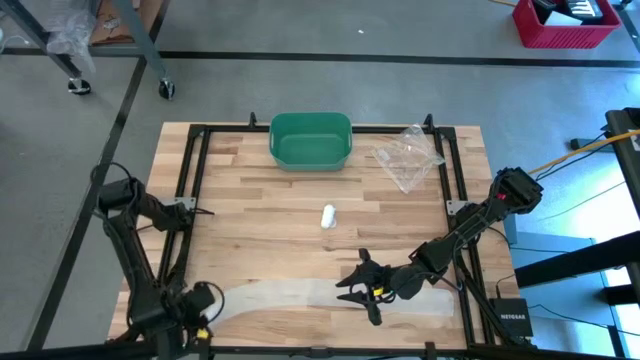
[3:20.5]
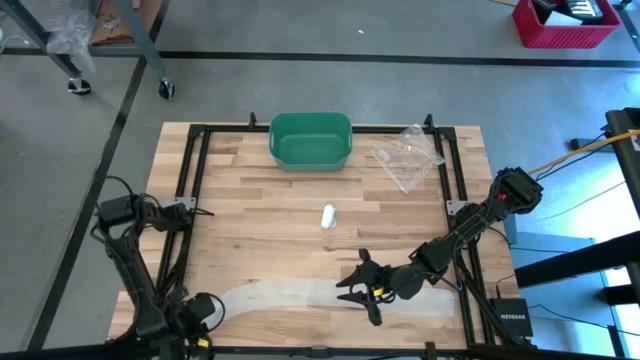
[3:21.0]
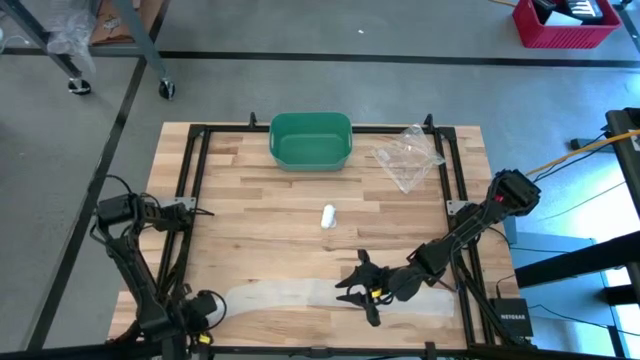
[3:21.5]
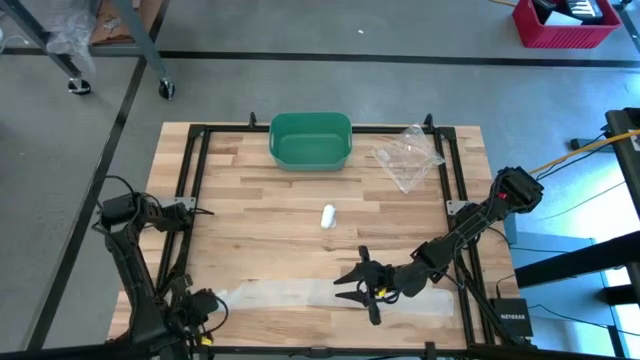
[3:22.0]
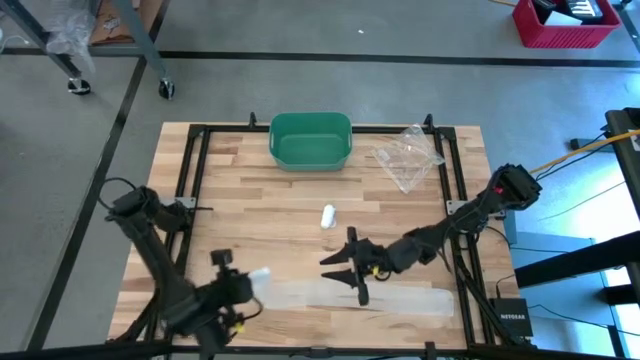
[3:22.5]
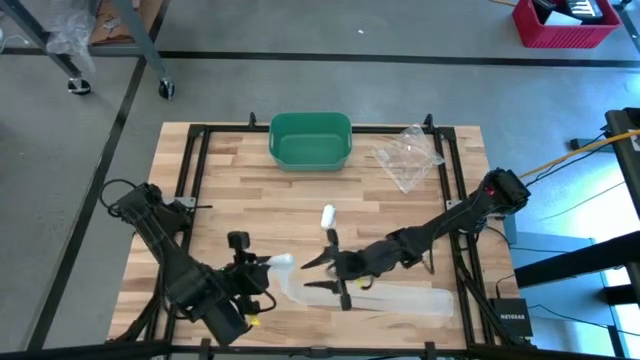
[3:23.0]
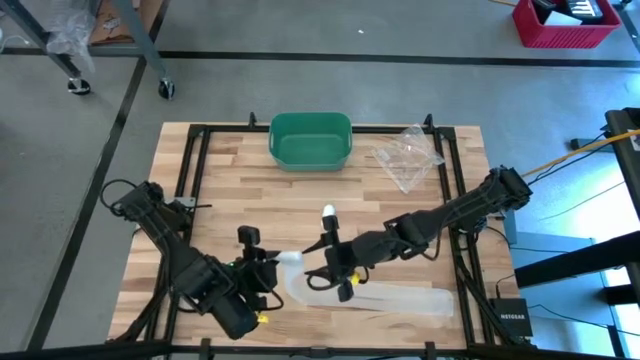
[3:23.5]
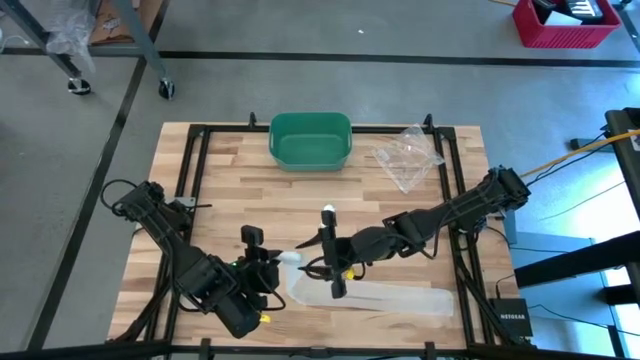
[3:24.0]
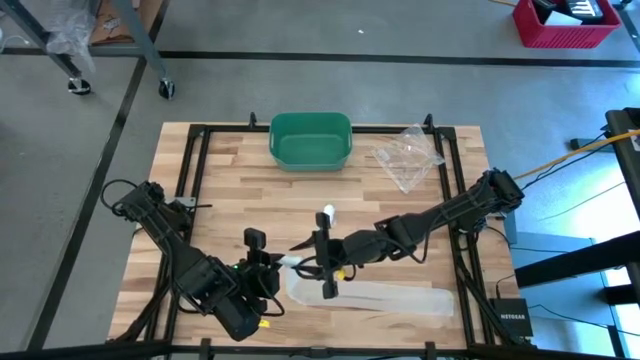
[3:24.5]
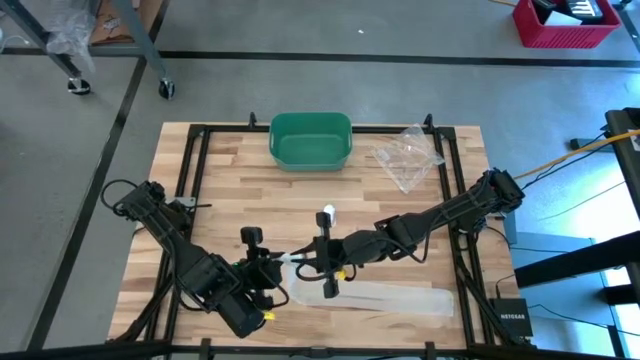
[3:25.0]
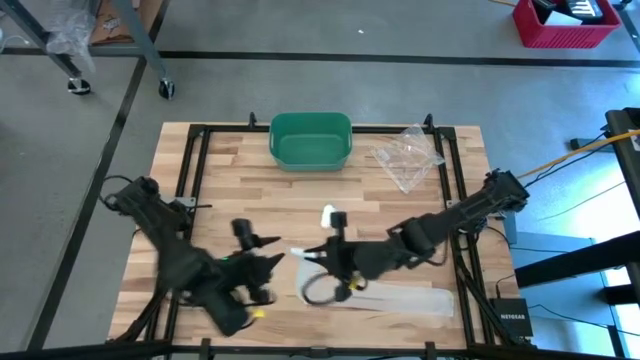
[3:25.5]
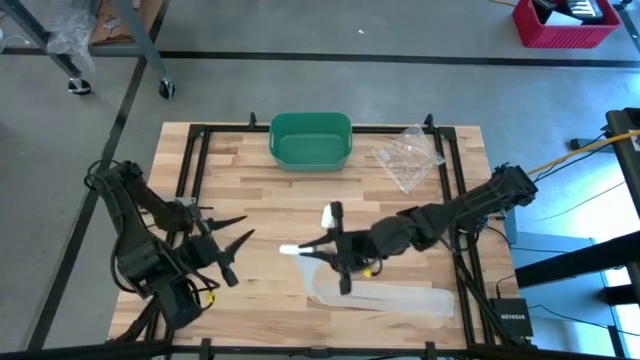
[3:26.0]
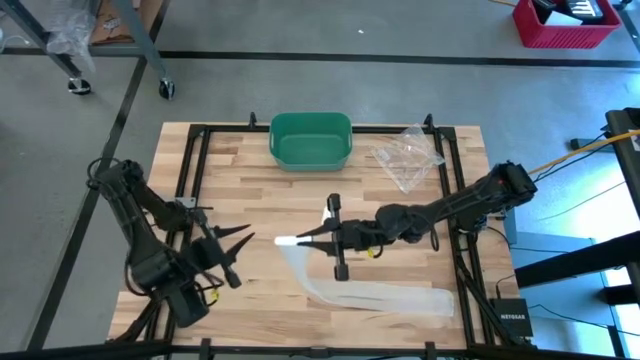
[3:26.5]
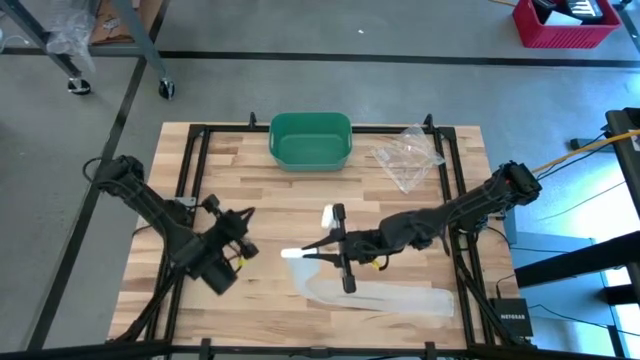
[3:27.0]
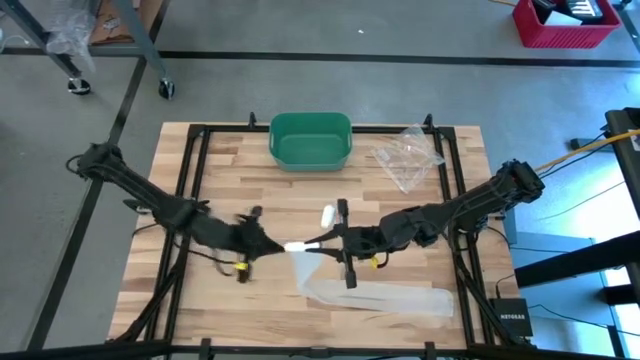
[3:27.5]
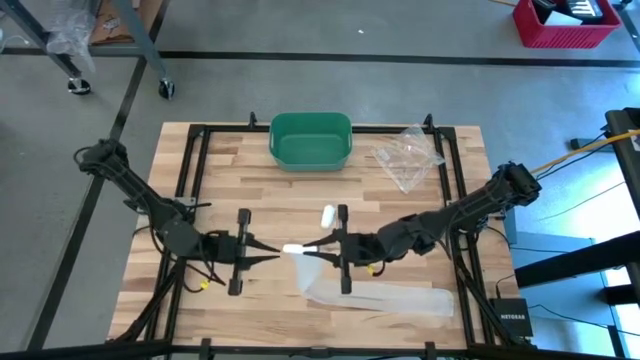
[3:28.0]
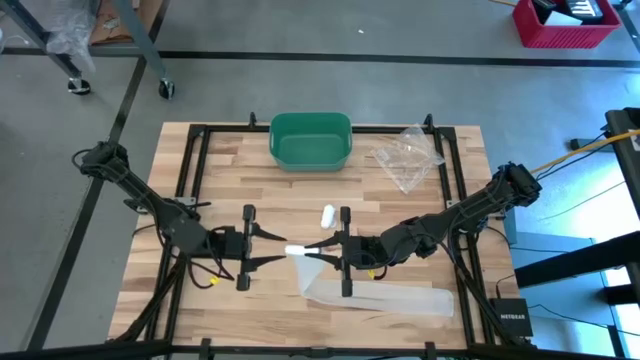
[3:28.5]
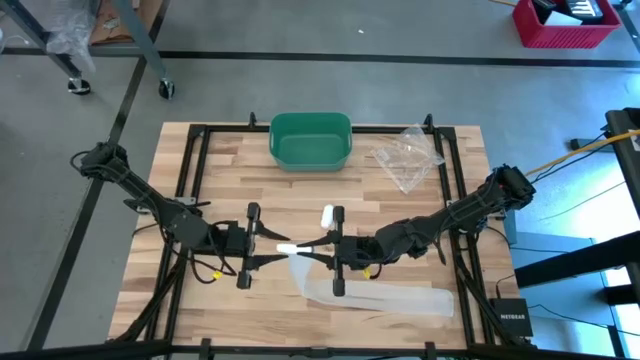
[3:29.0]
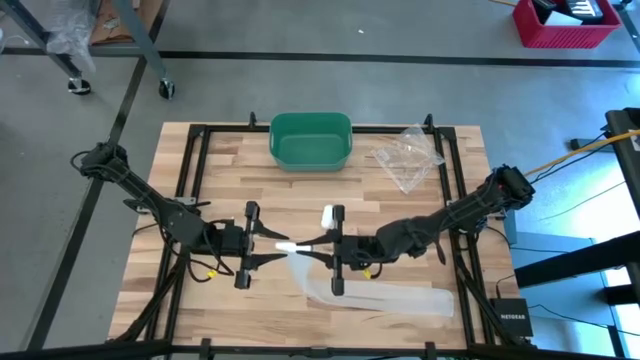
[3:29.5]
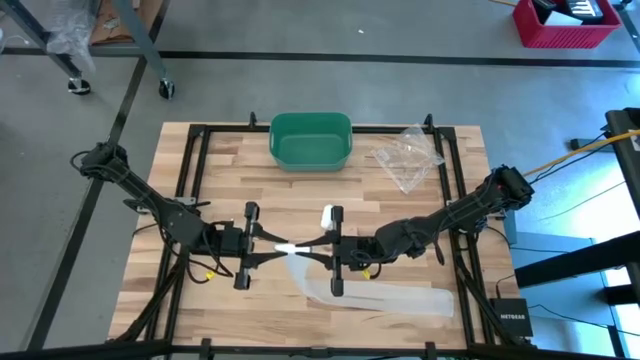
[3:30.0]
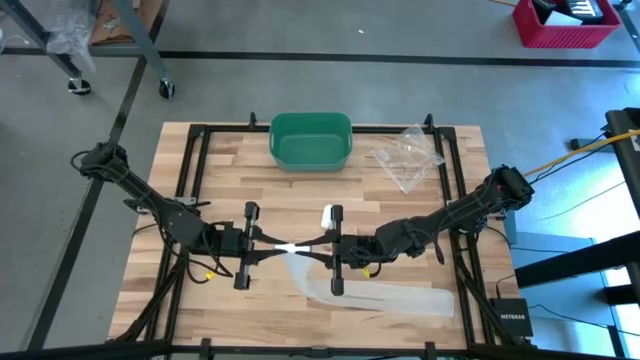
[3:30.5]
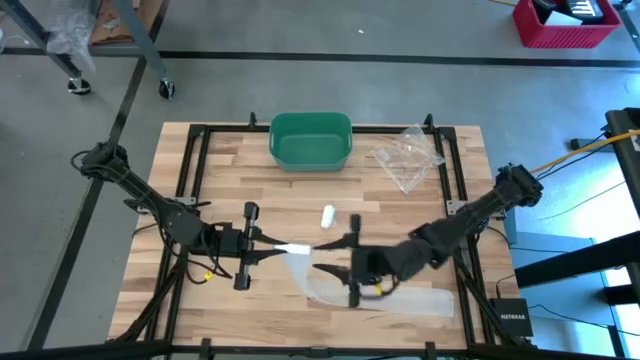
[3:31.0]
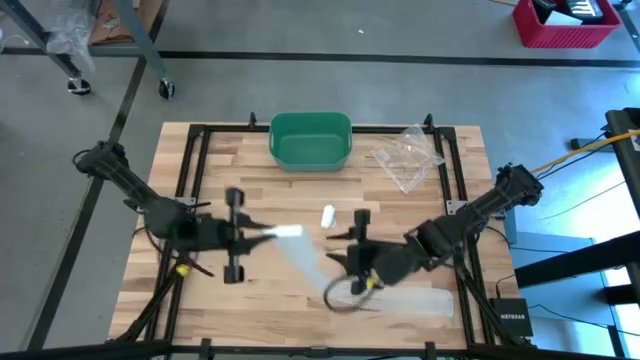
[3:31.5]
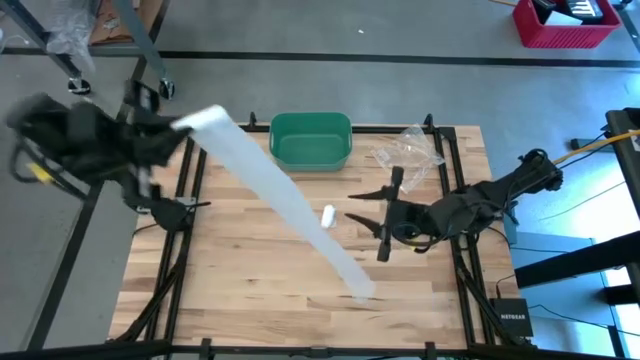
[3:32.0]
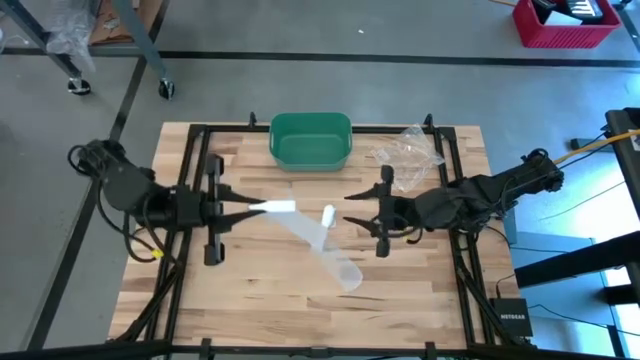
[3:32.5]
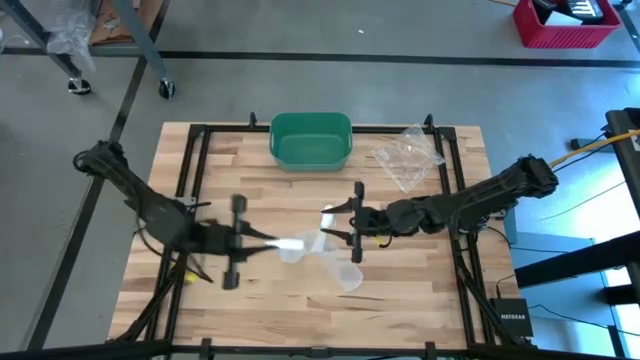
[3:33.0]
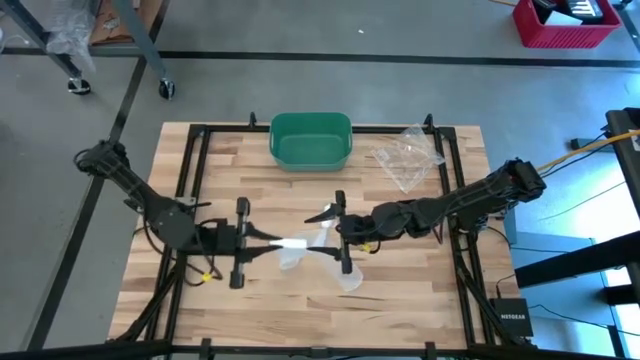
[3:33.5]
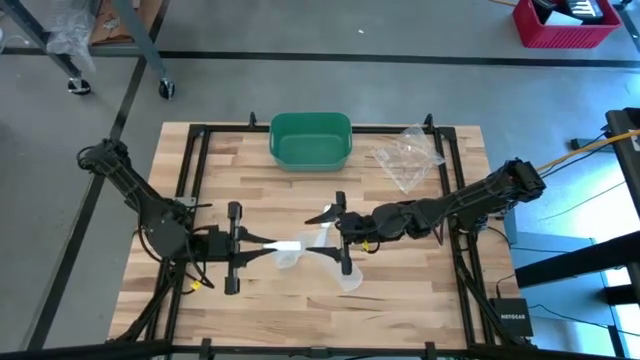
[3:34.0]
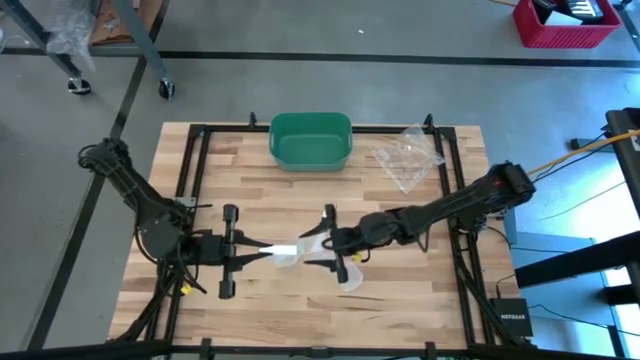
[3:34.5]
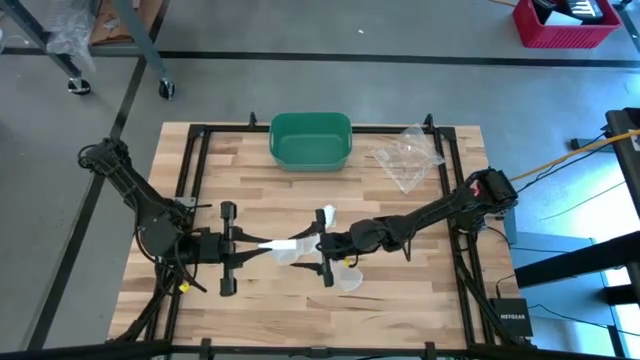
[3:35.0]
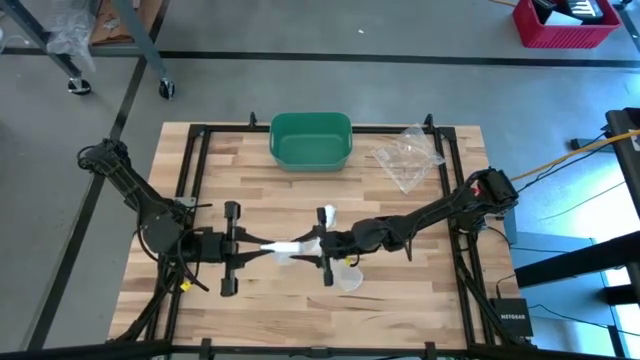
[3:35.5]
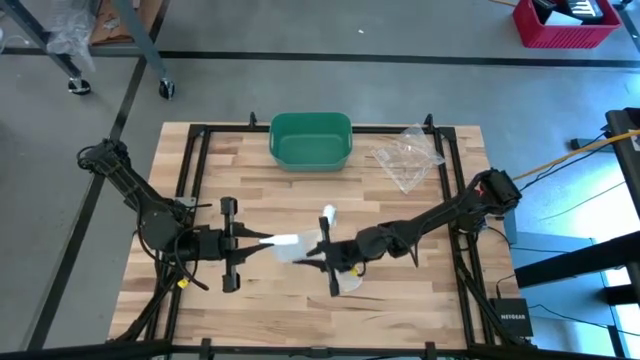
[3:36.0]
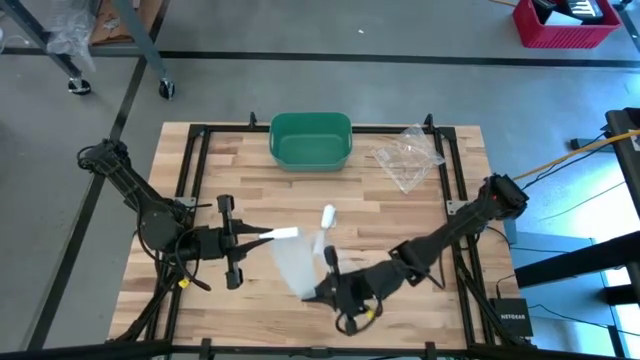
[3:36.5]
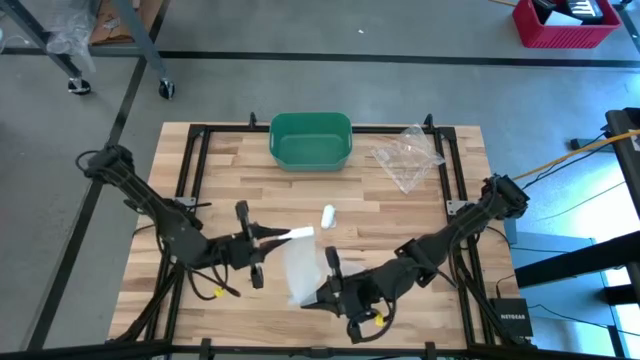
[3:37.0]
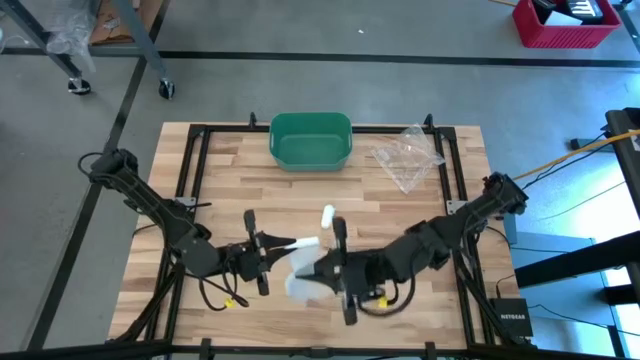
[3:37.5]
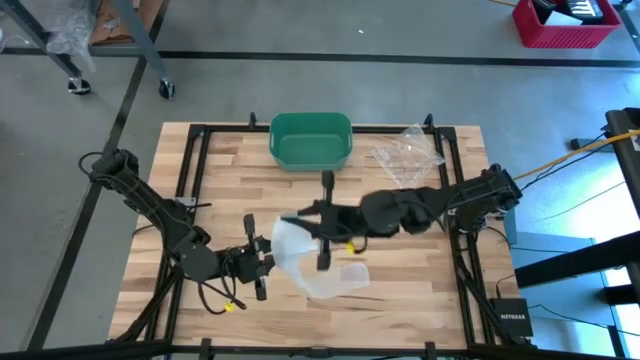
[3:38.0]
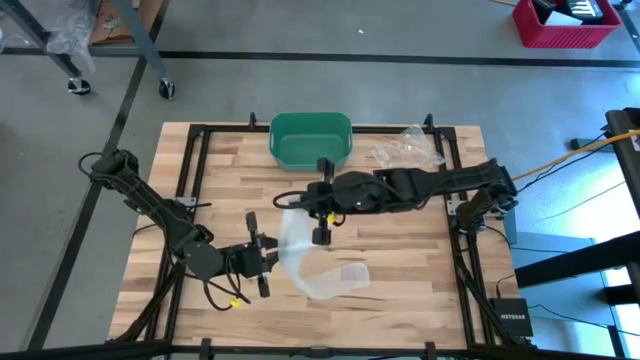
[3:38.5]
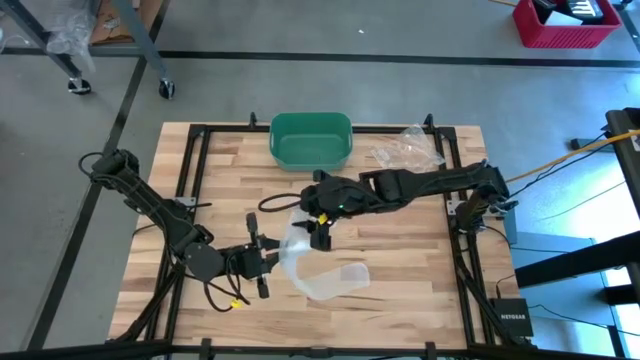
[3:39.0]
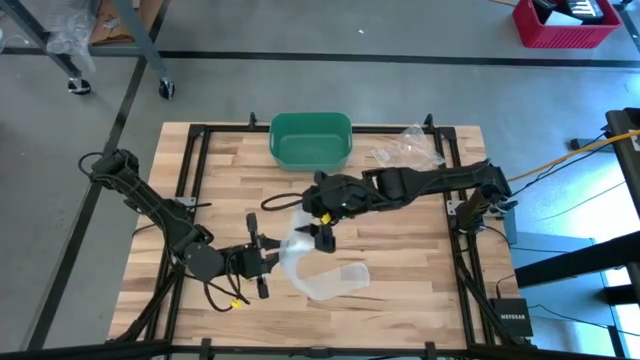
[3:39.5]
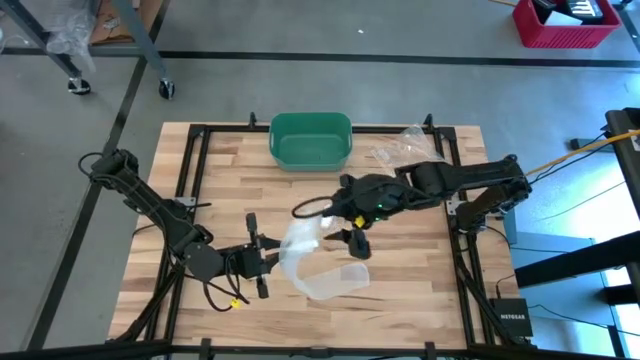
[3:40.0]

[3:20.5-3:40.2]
Task: Roll bandage
Roll the bottom white bandage
